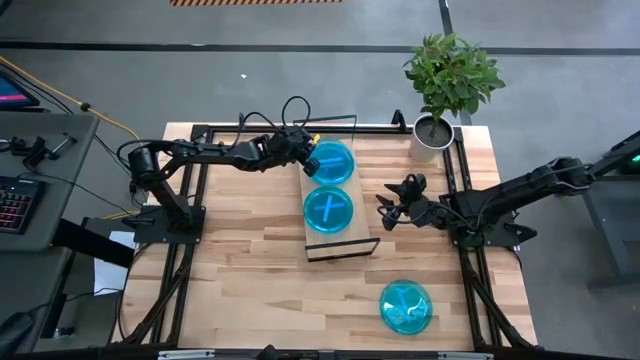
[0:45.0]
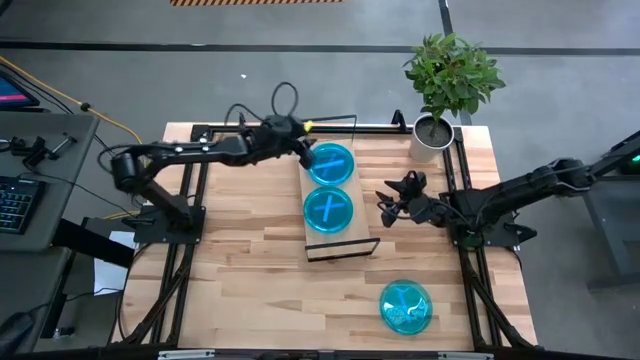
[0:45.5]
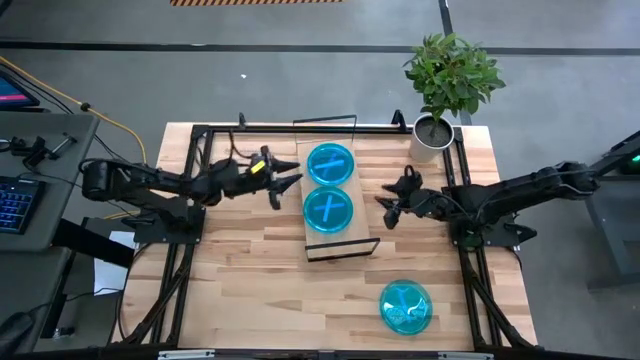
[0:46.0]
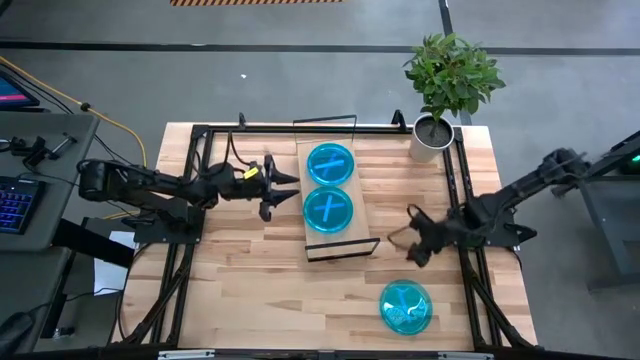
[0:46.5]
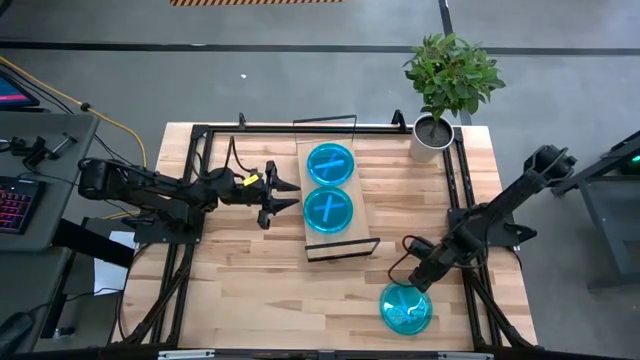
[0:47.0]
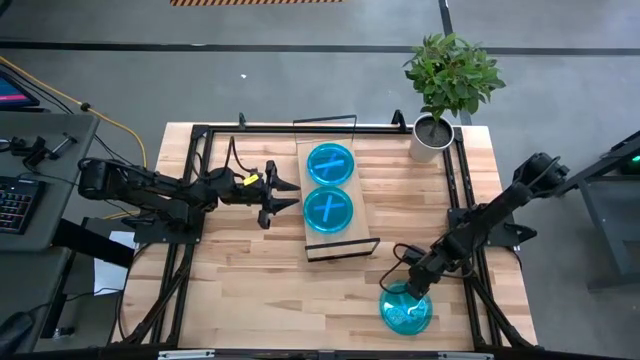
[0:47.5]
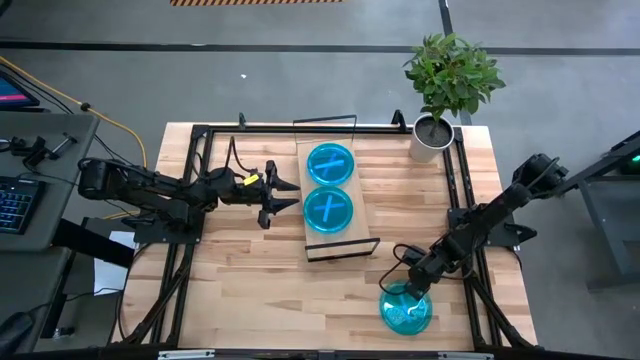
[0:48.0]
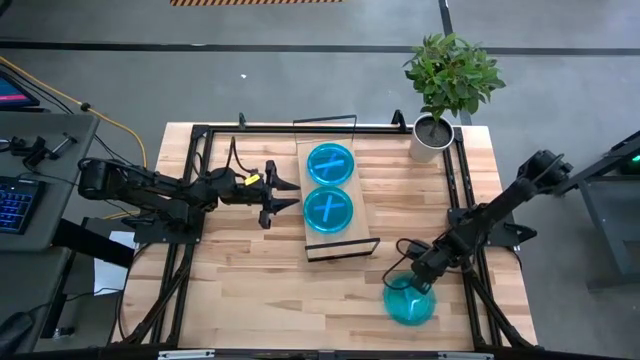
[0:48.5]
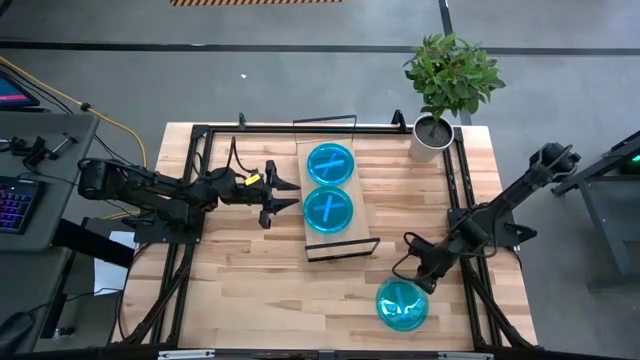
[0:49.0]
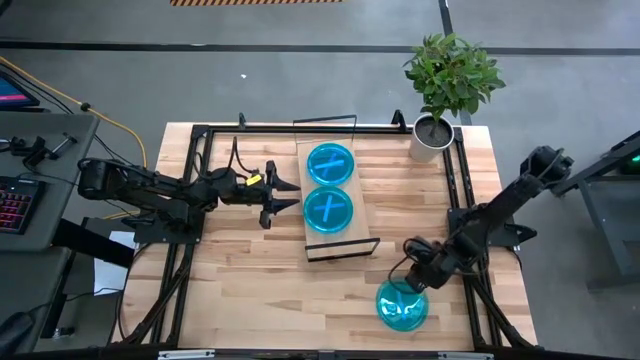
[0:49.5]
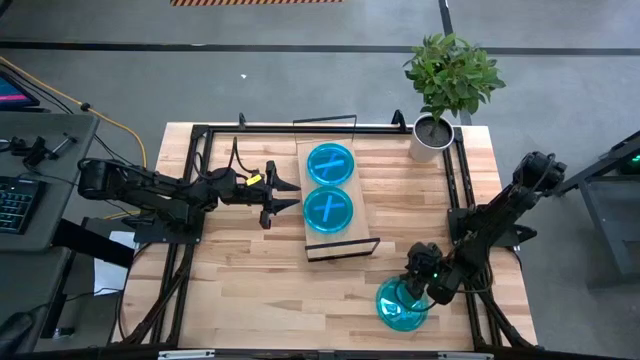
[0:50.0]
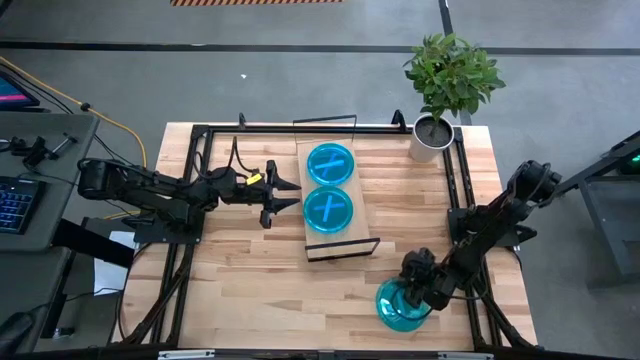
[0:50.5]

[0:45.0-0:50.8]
Task: Place and stack plates onto a shelf
Stack the blue plate on top of the blue plate on the shelf

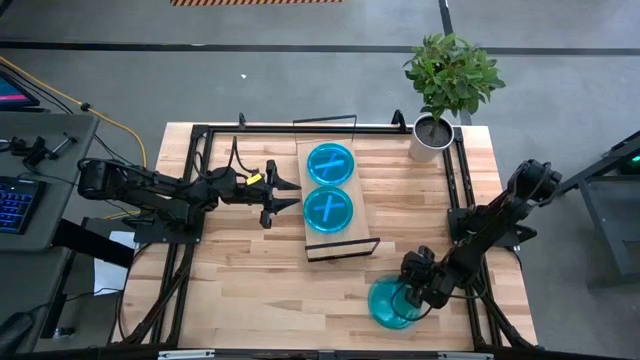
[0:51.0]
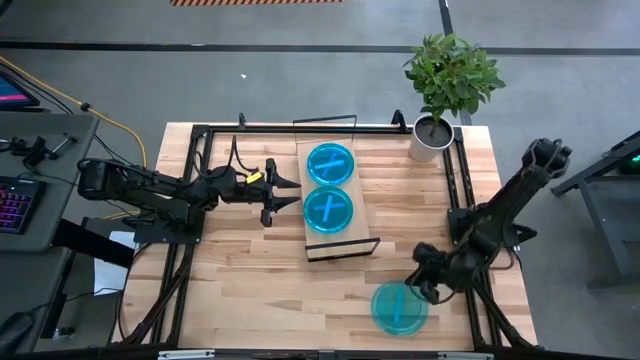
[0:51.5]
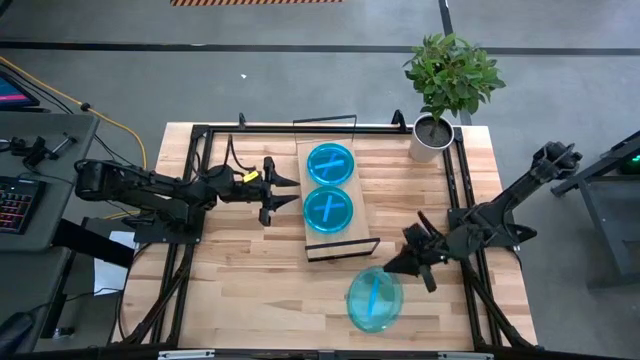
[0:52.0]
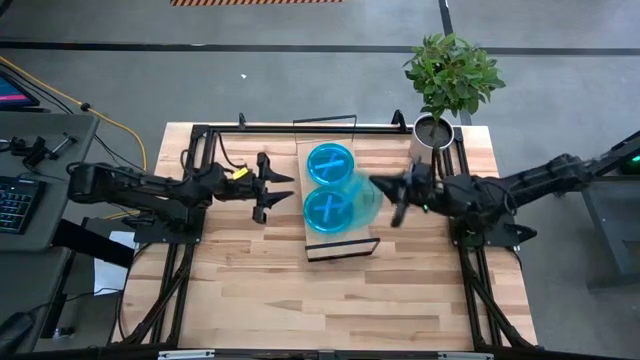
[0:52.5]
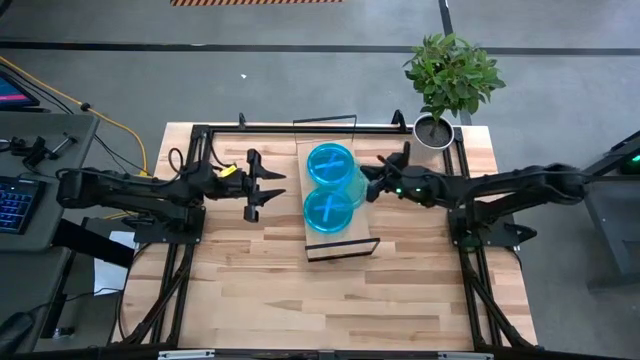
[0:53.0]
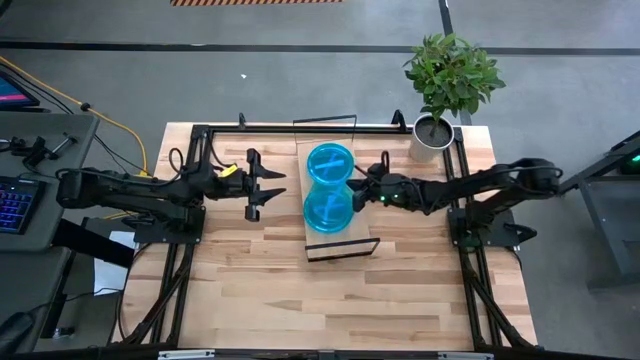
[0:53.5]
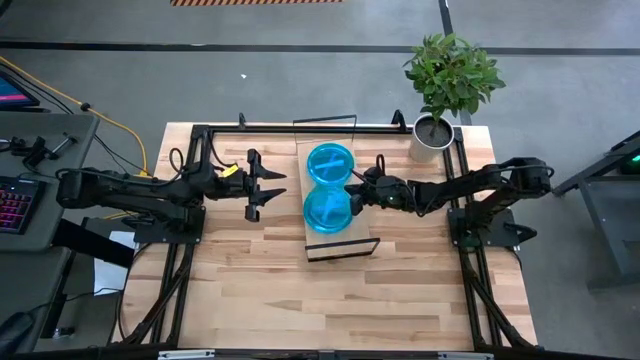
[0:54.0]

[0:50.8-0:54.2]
Stack the blue plate on top of the blue plate on the shelf

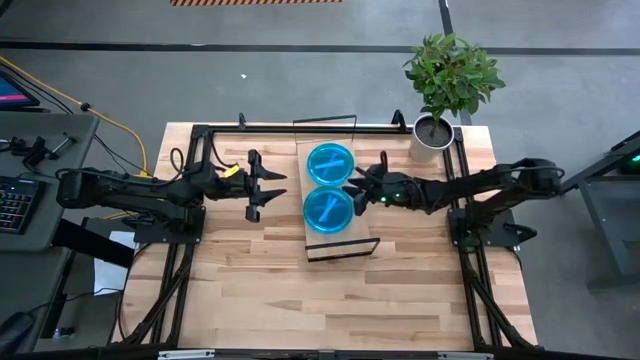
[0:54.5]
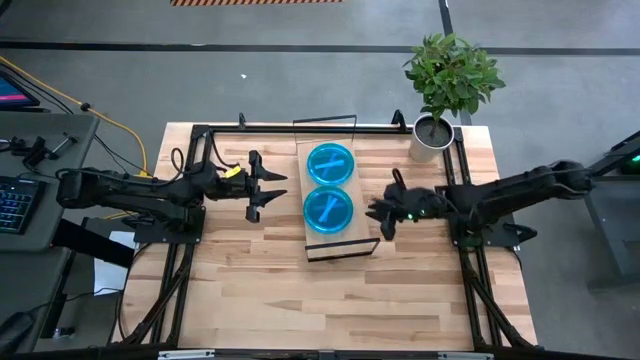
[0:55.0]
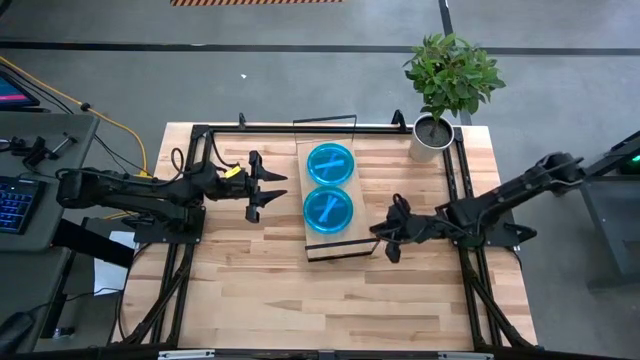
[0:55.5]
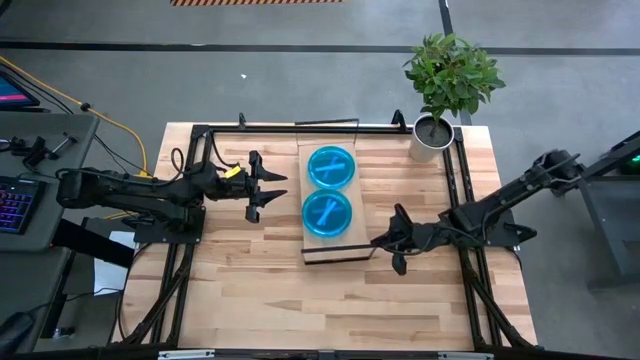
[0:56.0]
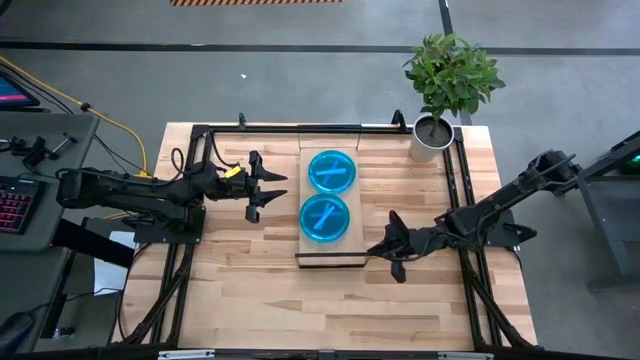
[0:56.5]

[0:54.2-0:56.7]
Adjust the shelf

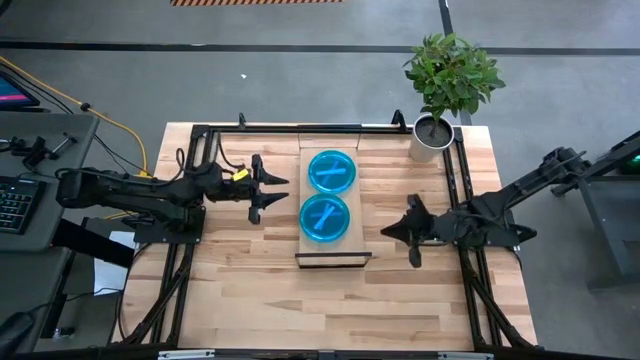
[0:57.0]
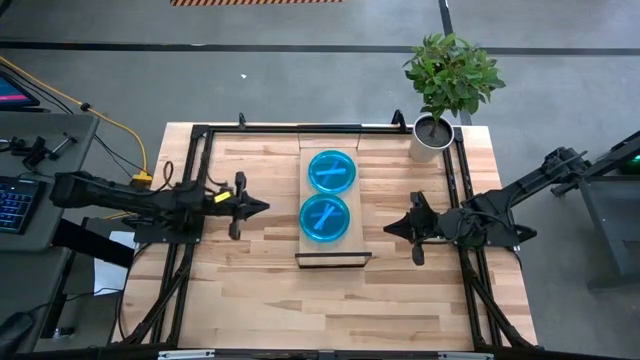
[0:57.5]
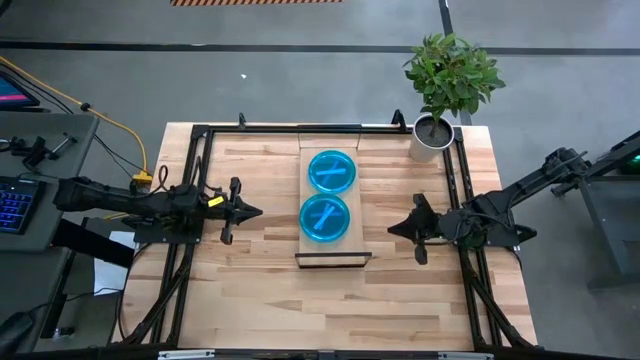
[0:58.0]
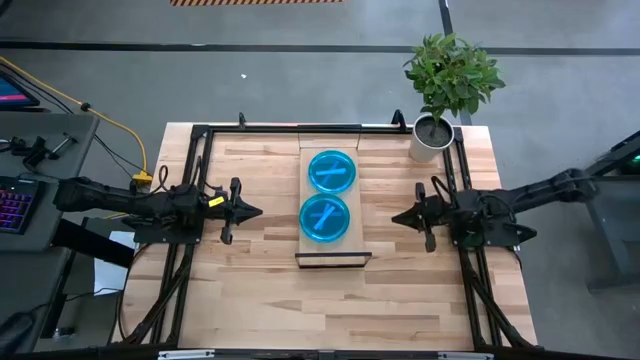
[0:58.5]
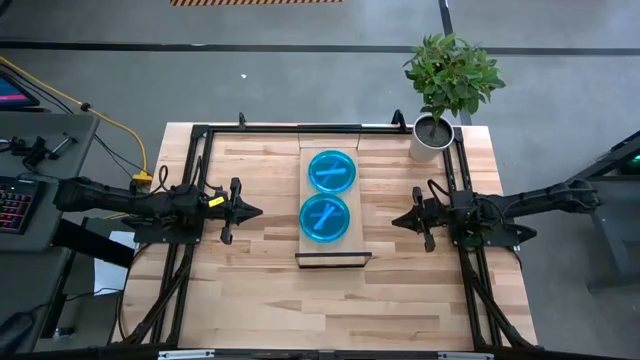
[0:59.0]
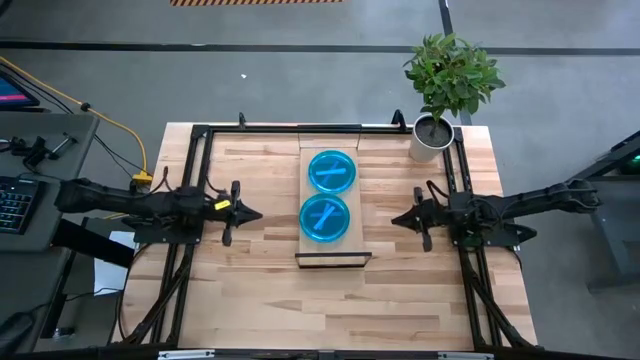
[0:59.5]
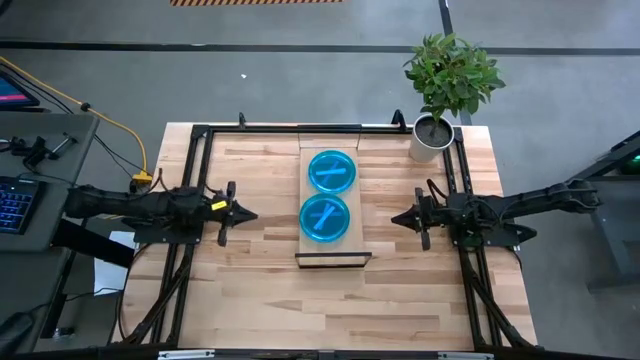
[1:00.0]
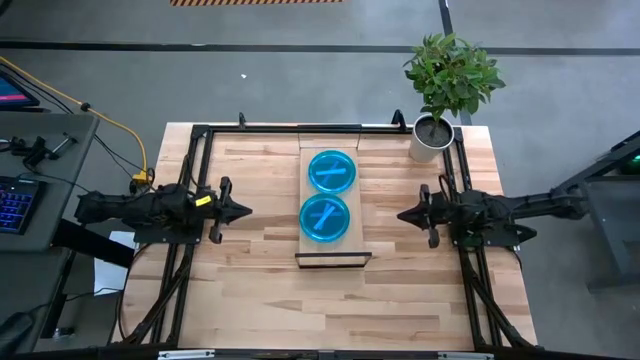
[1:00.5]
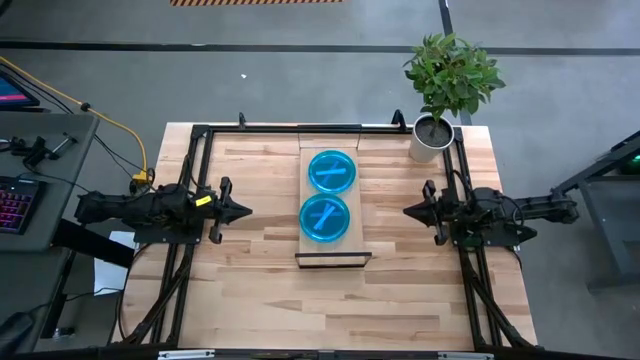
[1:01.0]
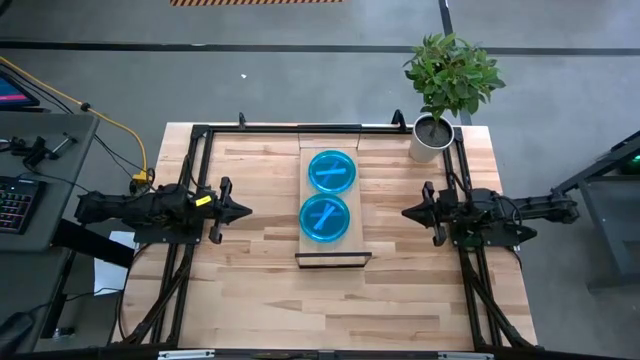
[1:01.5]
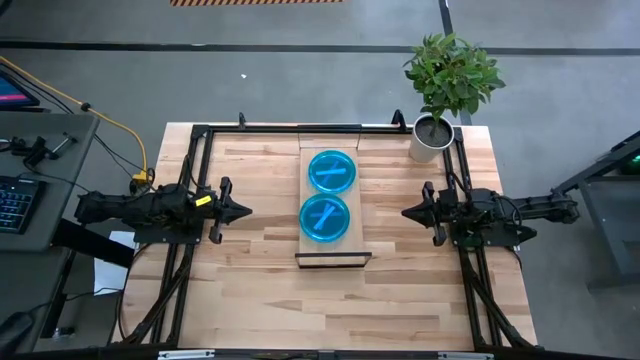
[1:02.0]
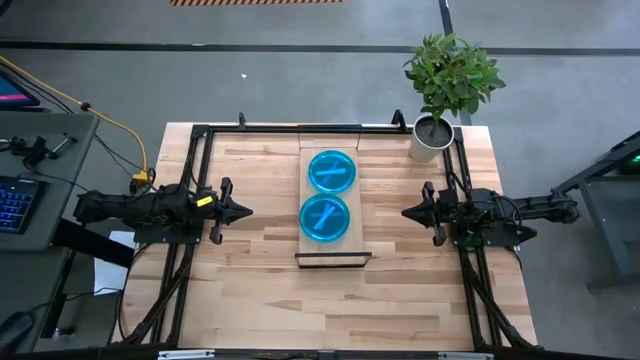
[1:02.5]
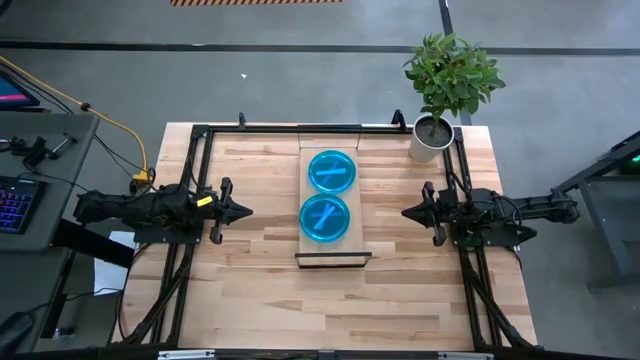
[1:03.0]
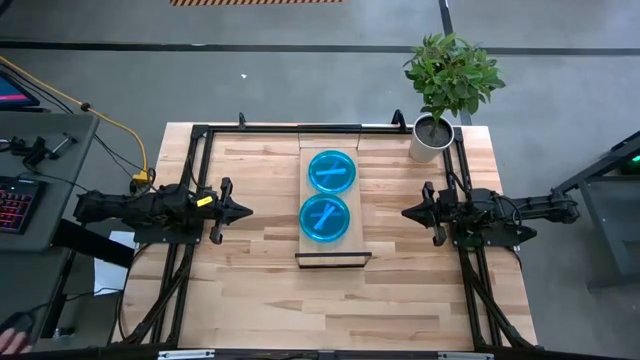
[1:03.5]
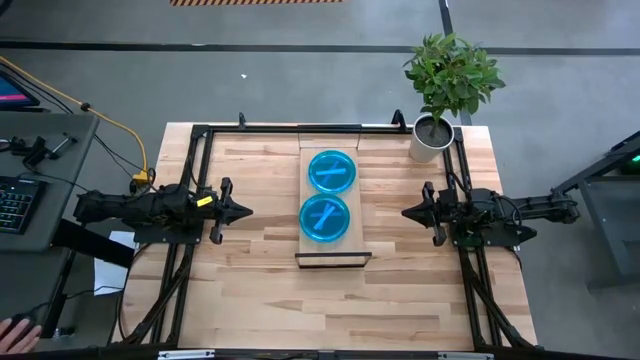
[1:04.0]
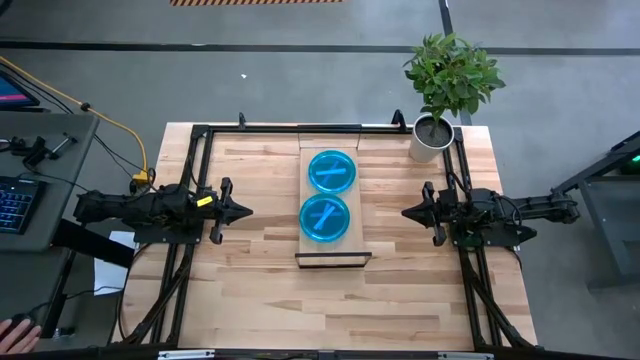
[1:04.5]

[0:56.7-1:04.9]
Return to Home Position

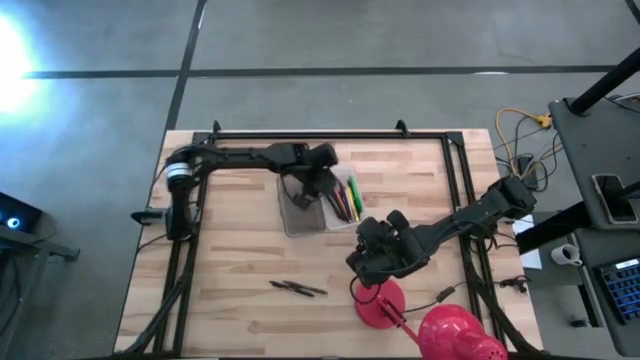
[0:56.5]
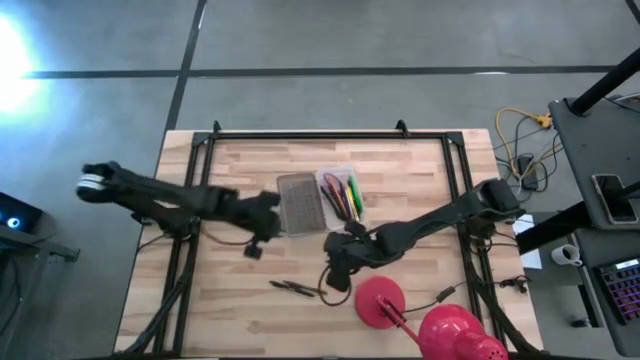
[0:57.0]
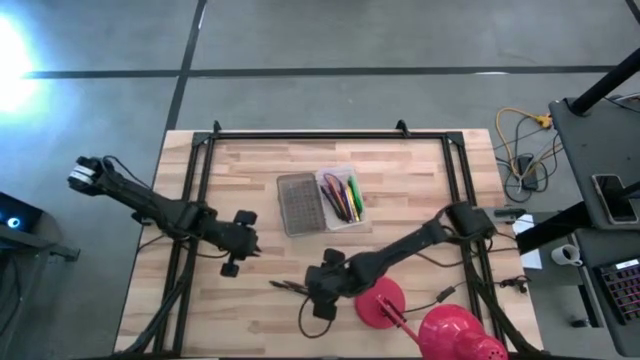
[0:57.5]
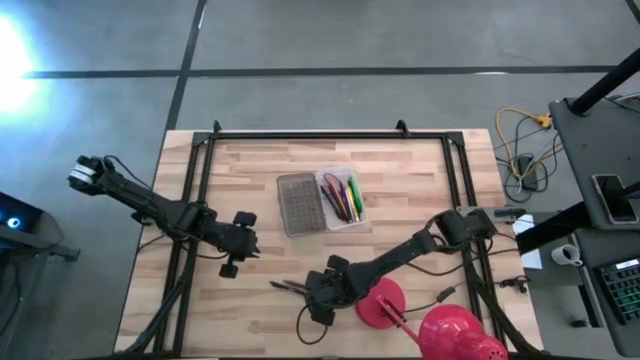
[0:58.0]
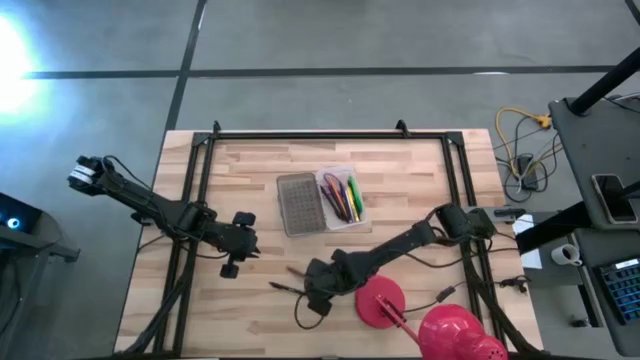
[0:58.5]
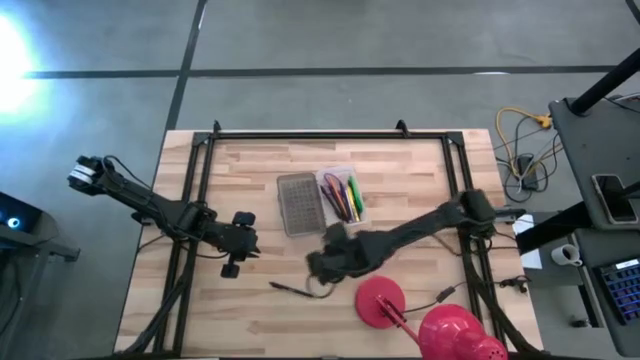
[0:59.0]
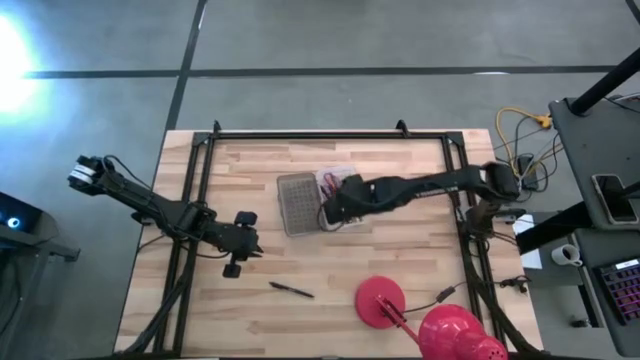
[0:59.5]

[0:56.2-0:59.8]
Task: Pick & place school supplies into a supply box
Put the brown pen into the black supply box
